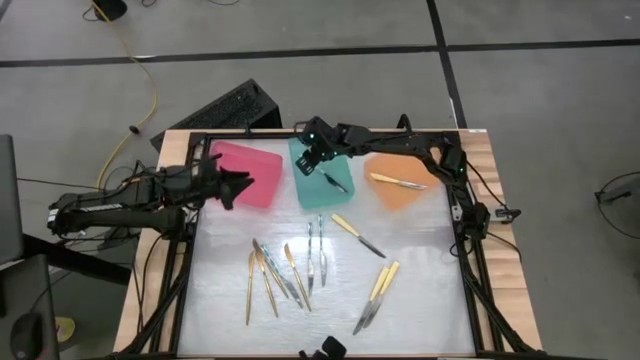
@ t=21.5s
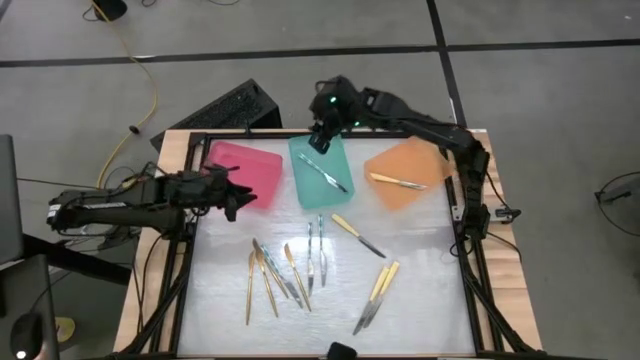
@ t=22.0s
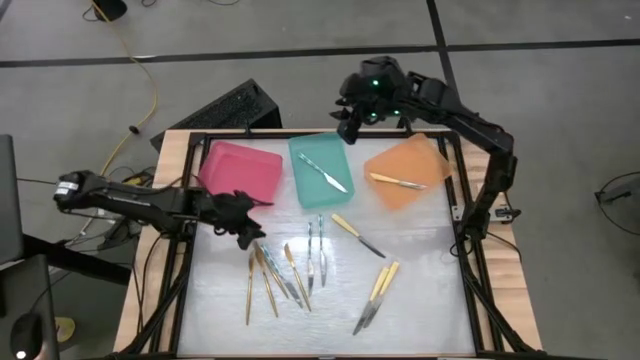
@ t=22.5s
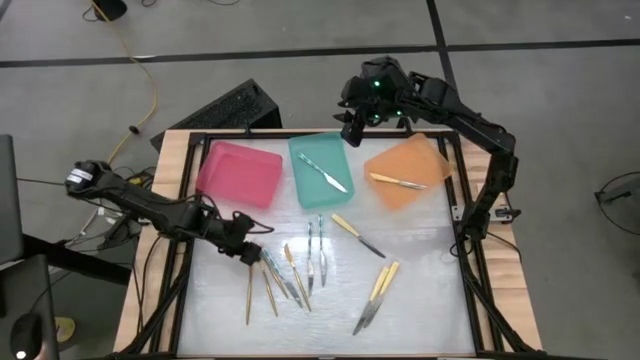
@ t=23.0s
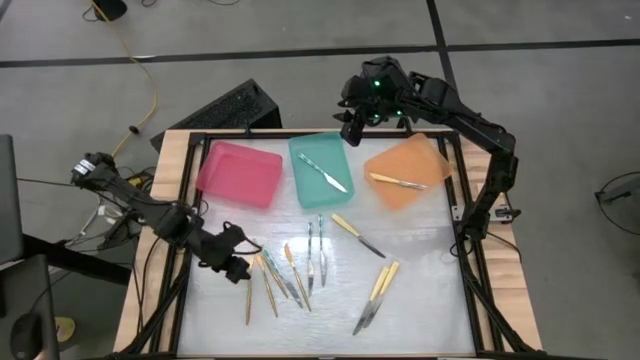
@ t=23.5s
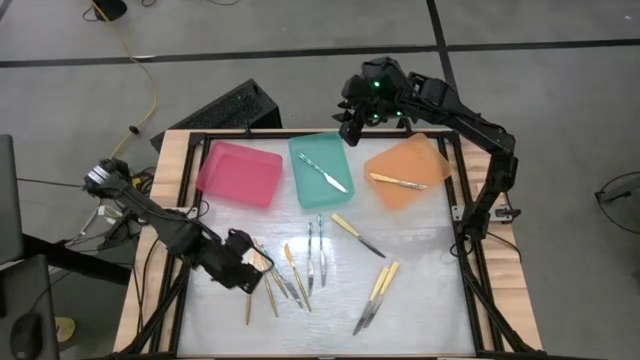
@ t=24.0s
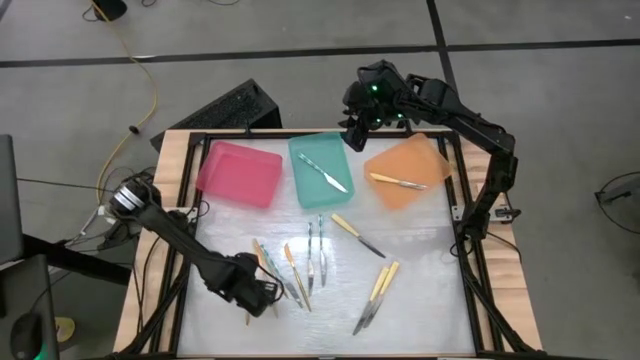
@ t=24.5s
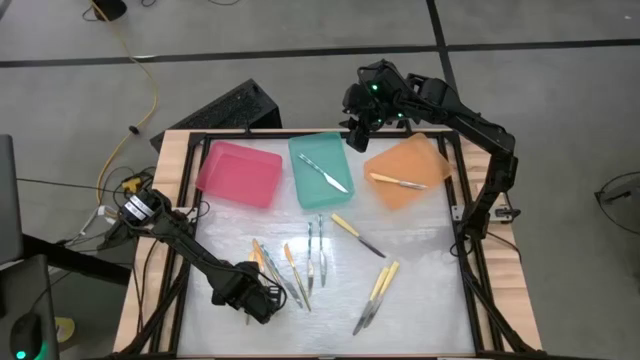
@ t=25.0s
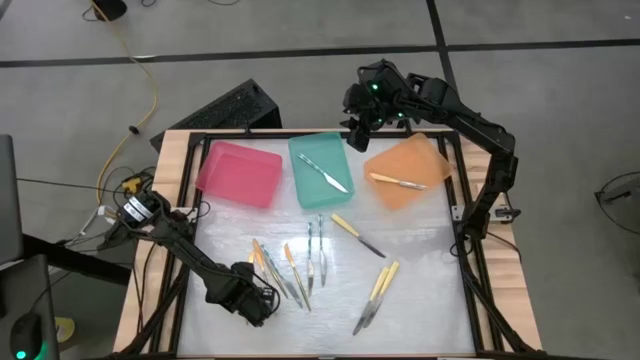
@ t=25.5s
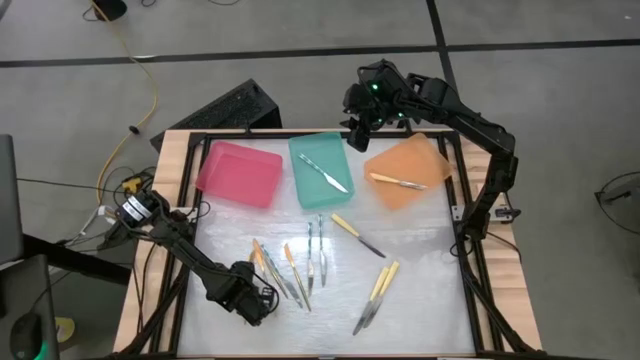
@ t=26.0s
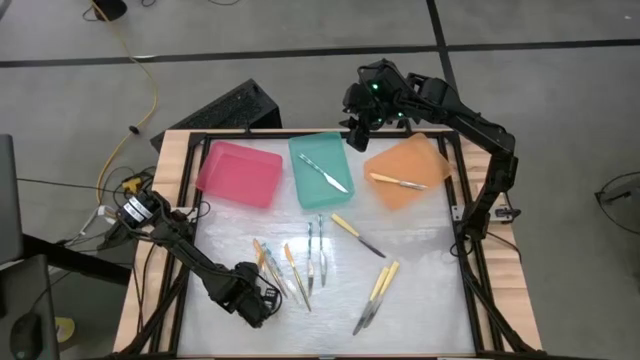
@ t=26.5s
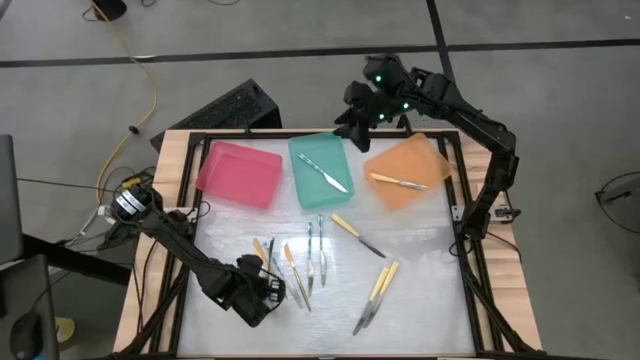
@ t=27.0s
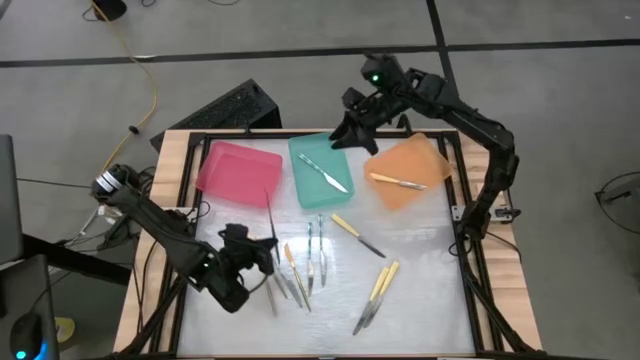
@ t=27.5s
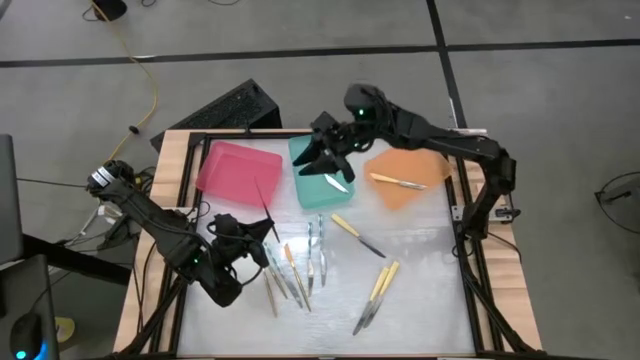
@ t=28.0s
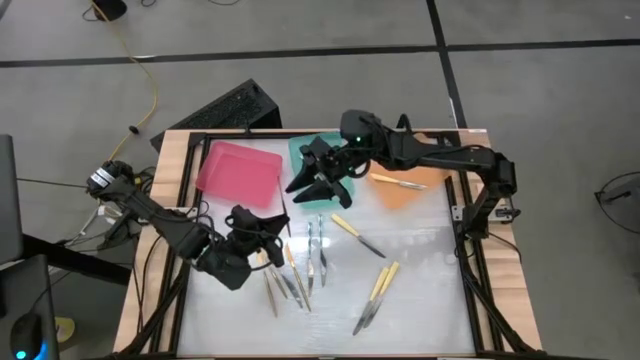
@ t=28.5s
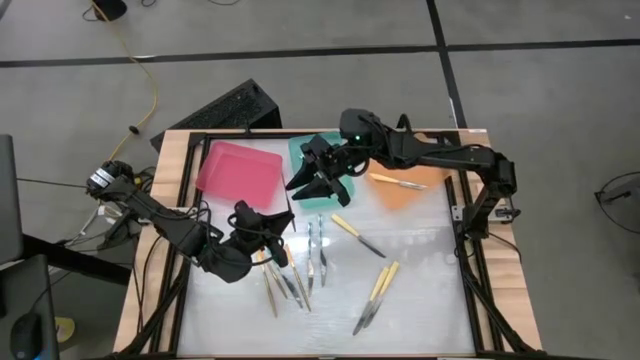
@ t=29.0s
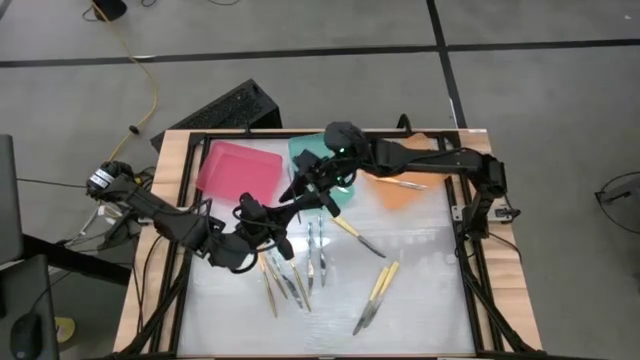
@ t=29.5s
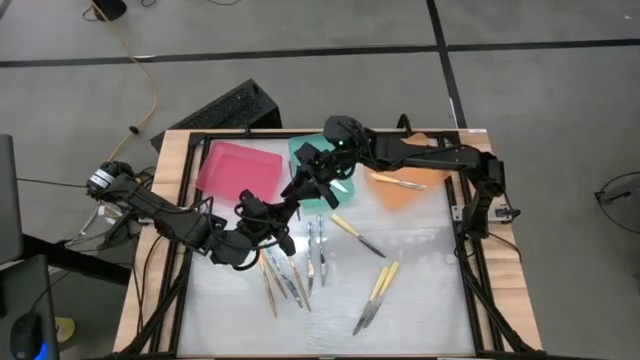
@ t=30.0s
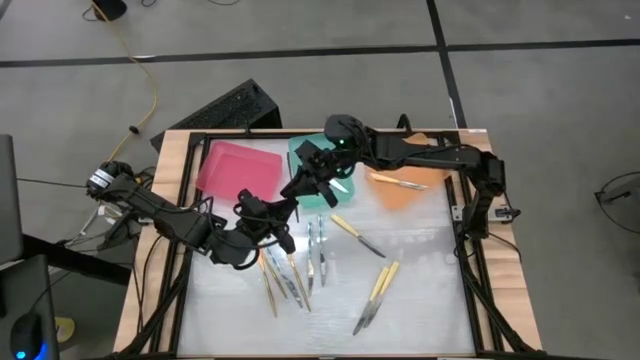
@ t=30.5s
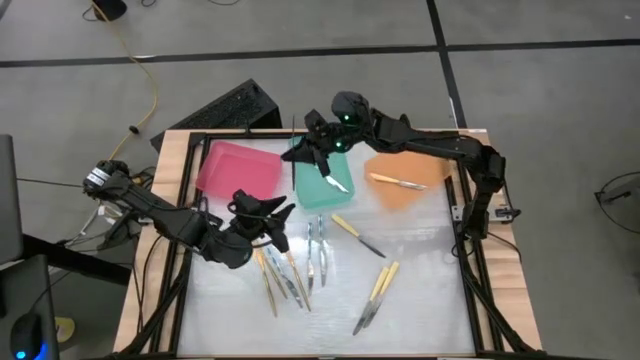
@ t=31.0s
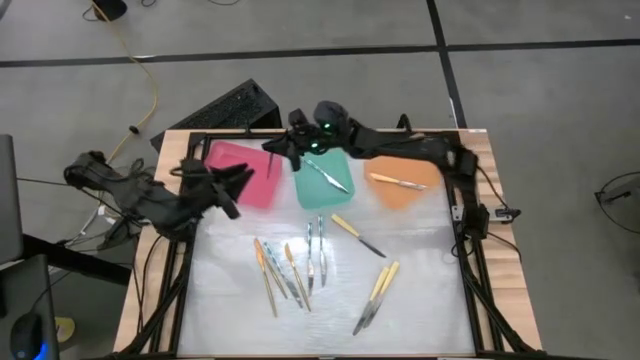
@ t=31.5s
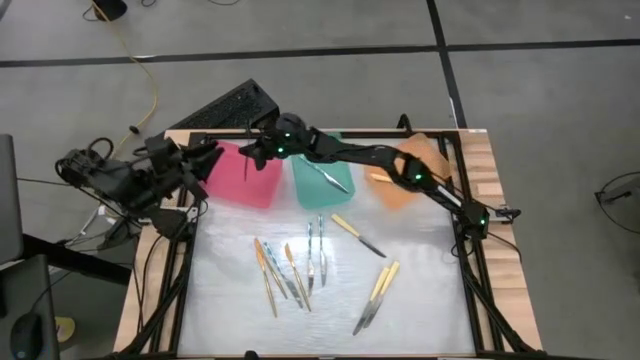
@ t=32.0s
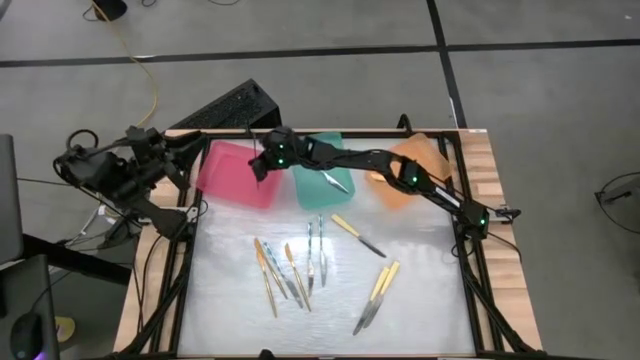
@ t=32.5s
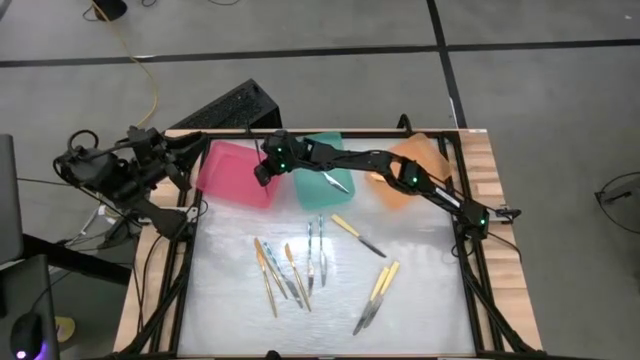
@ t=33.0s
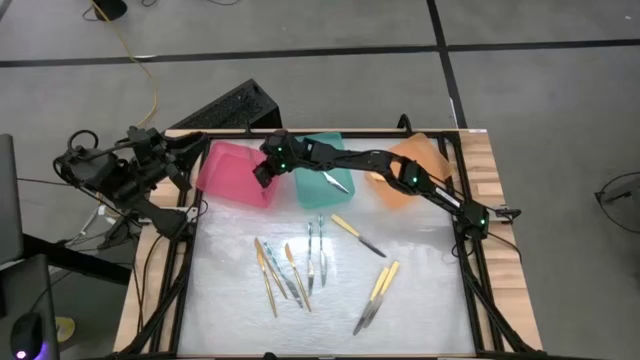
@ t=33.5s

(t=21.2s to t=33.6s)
Task: Sort silverware by color (type)
Put the gold knife into the red bin

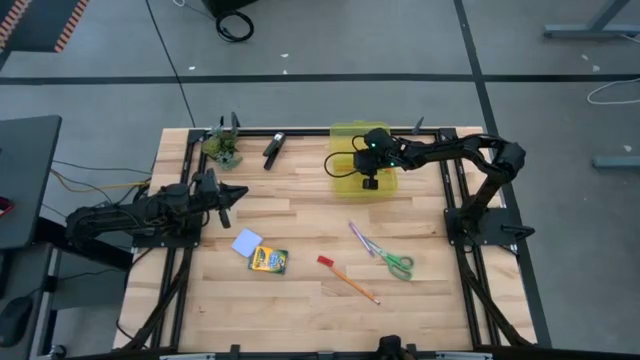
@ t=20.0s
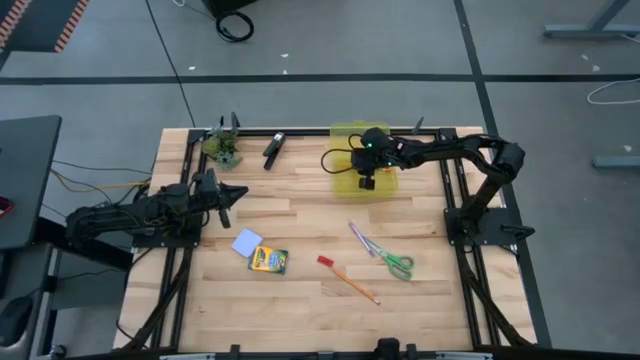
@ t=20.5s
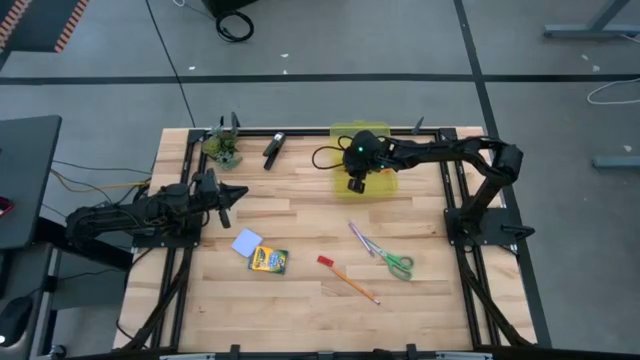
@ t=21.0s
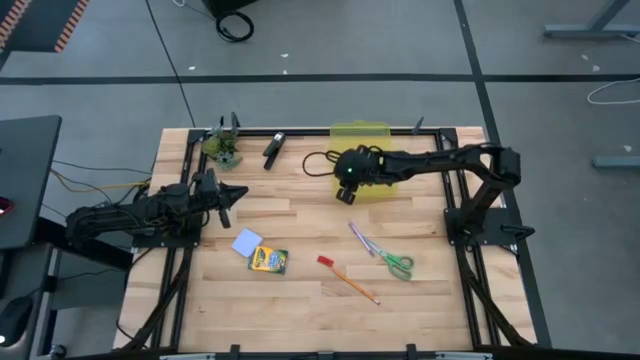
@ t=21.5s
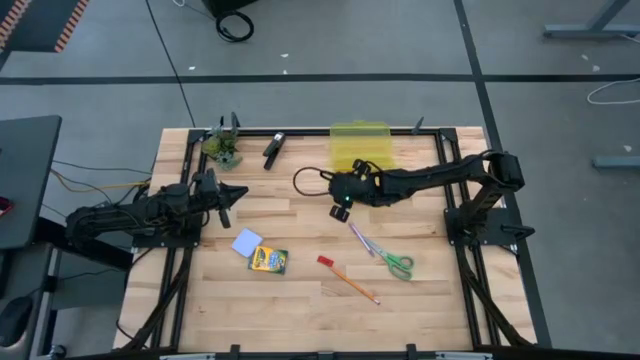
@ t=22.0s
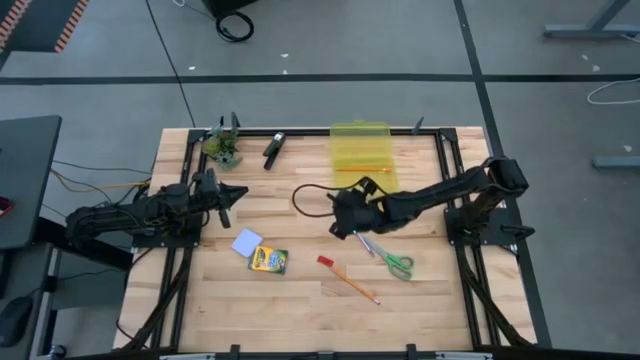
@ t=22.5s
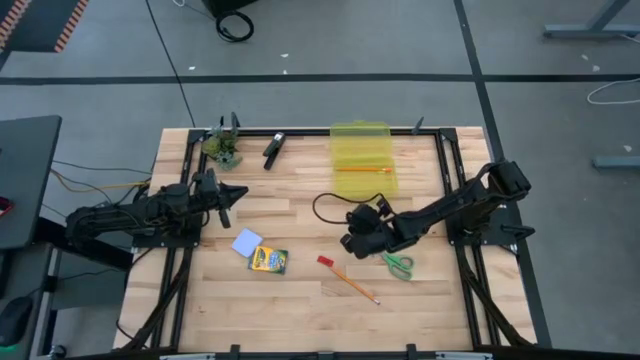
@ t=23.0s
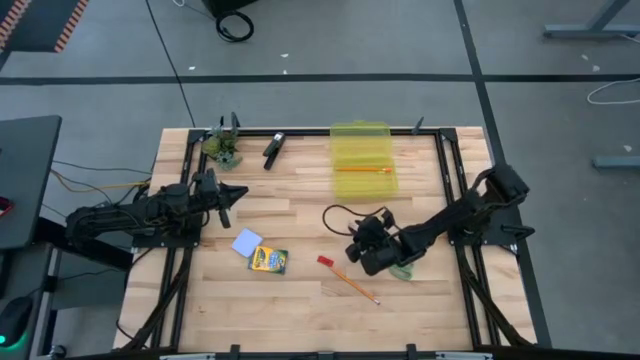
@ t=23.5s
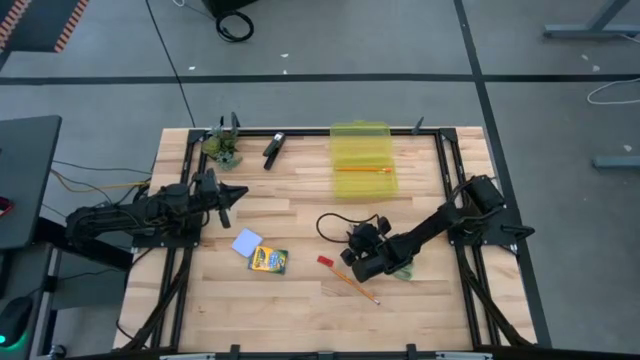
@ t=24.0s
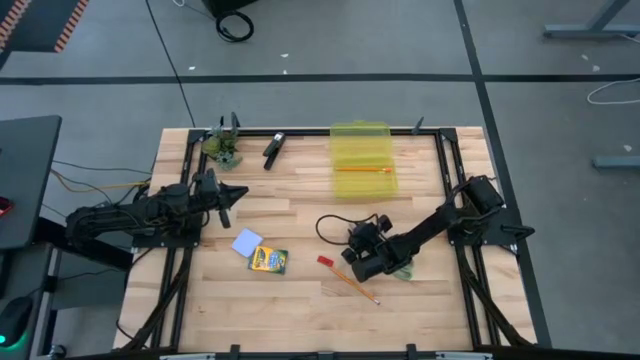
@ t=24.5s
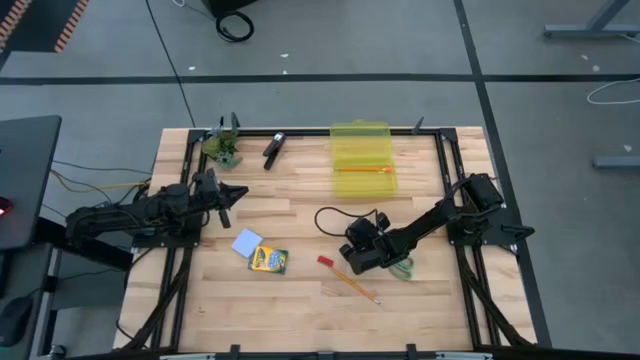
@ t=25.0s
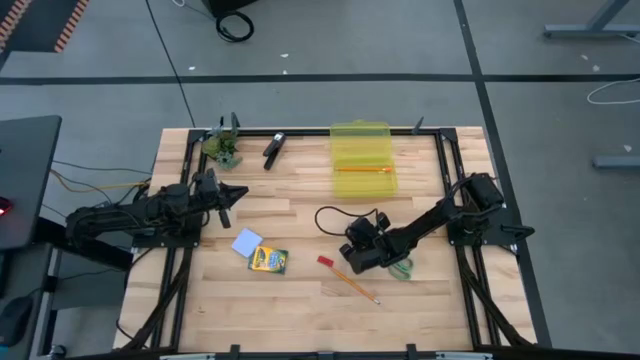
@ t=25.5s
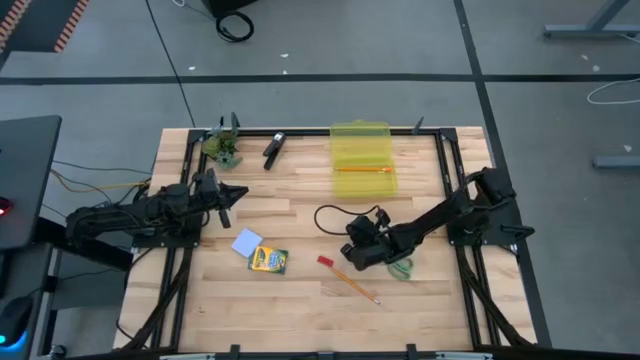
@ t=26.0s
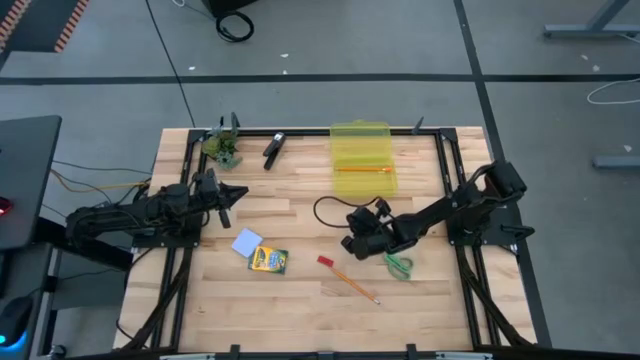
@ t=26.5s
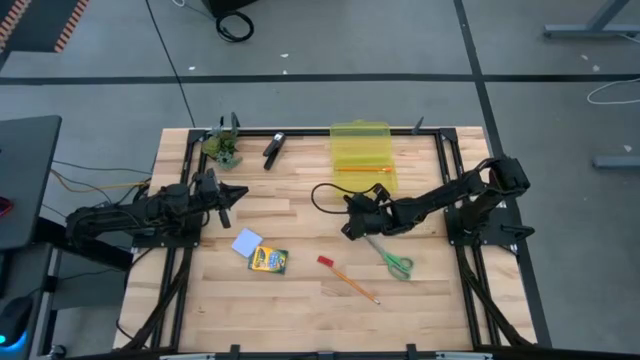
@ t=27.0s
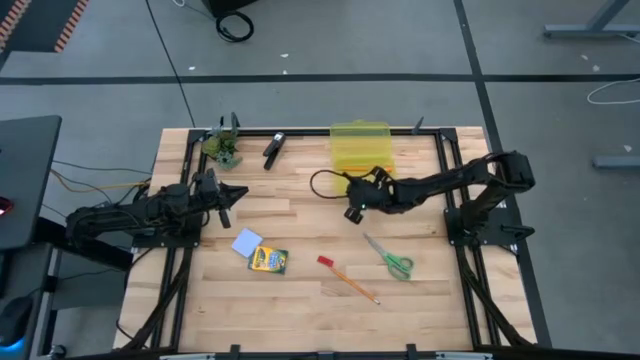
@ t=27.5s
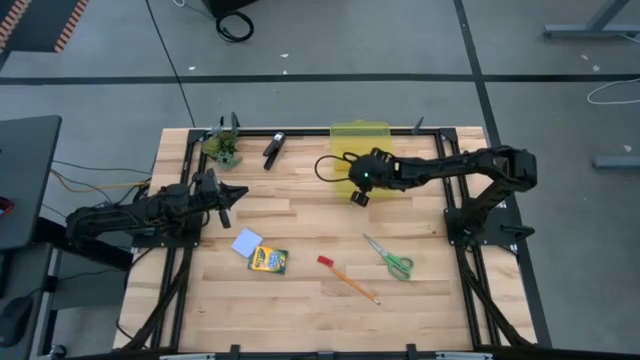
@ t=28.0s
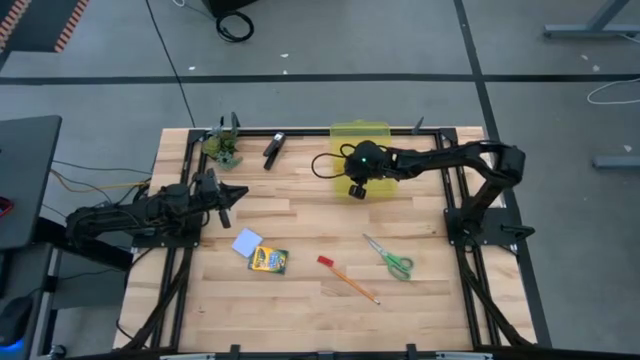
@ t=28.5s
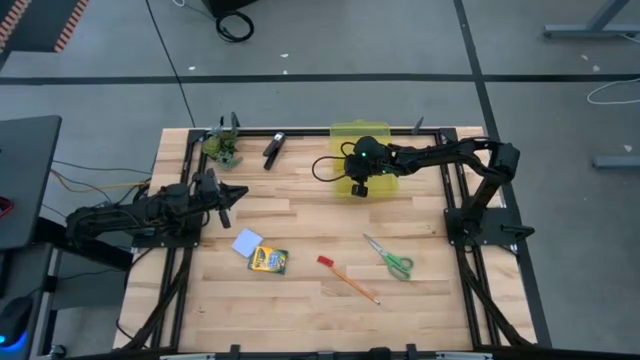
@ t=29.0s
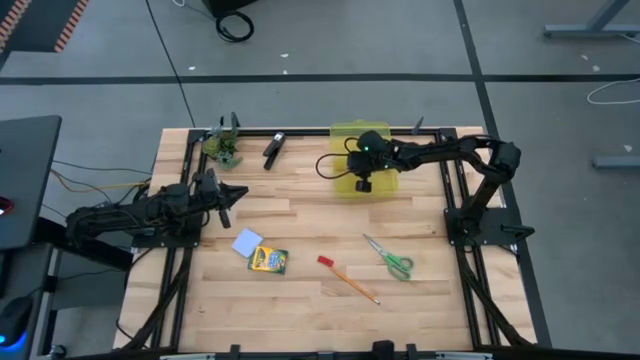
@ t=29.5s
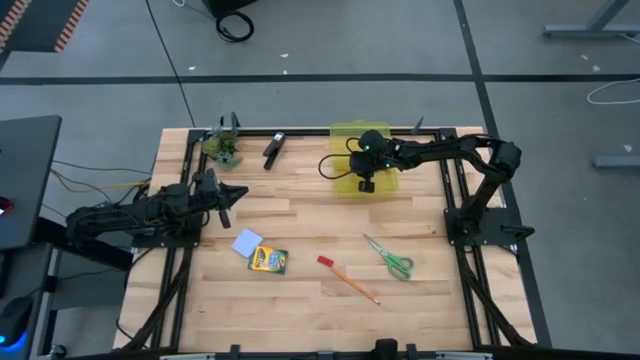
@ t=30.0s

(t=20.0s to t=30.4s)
Task: Pack school essentials
Put the purple pen into the yellow supply box
